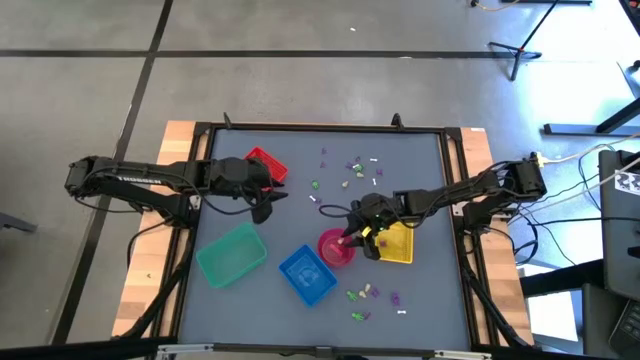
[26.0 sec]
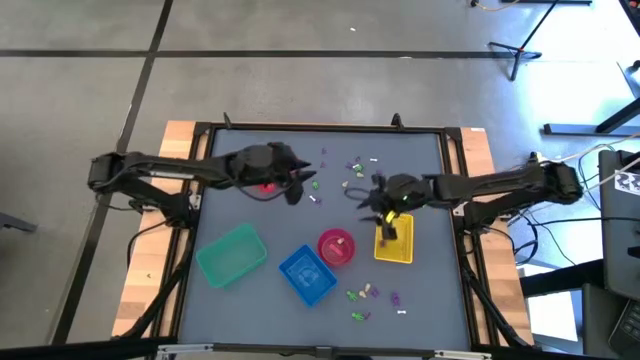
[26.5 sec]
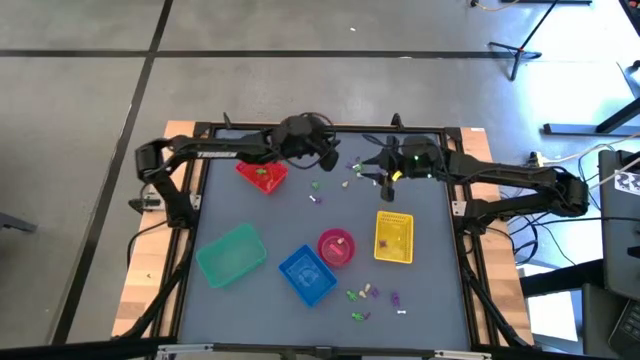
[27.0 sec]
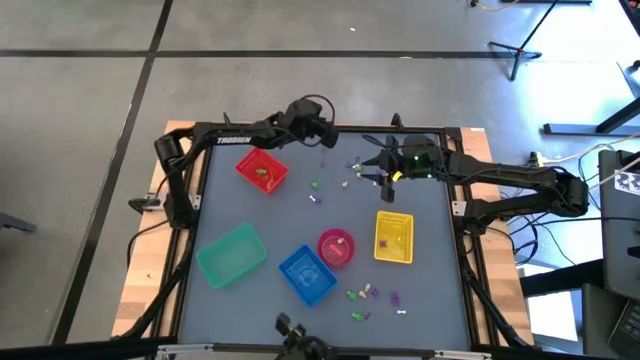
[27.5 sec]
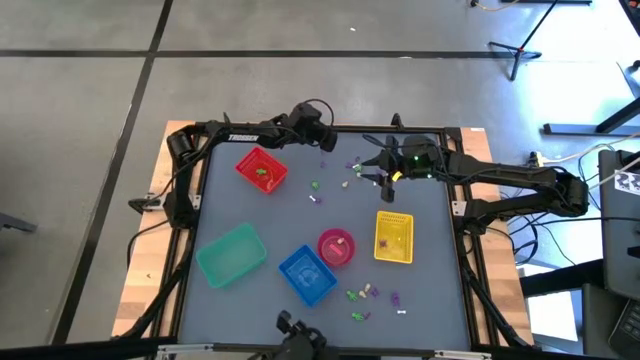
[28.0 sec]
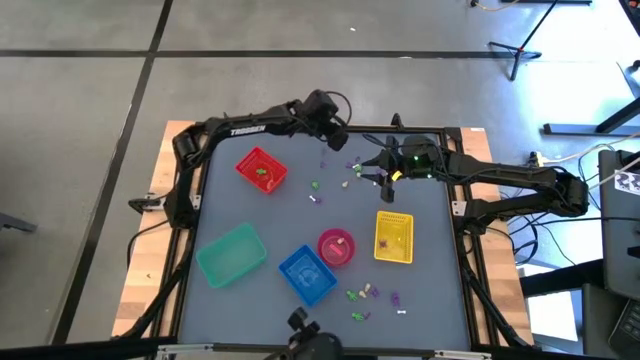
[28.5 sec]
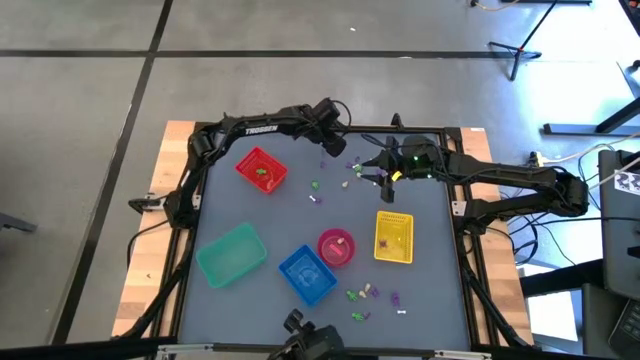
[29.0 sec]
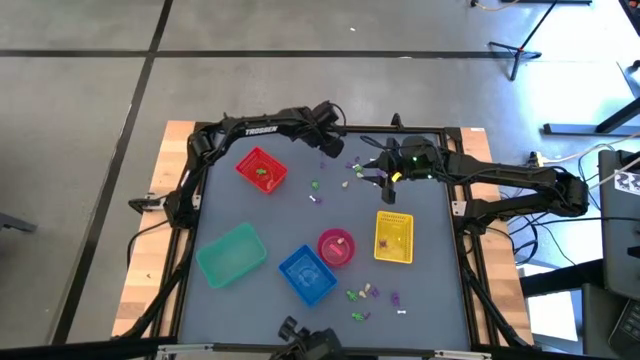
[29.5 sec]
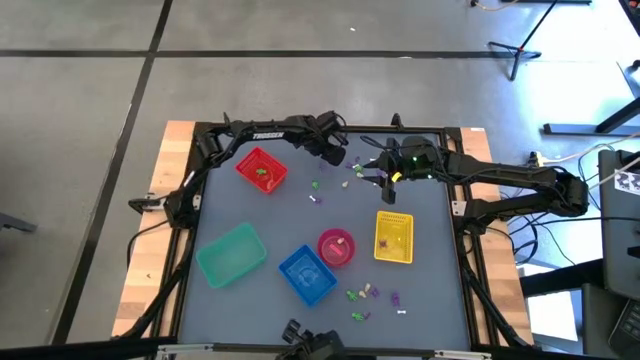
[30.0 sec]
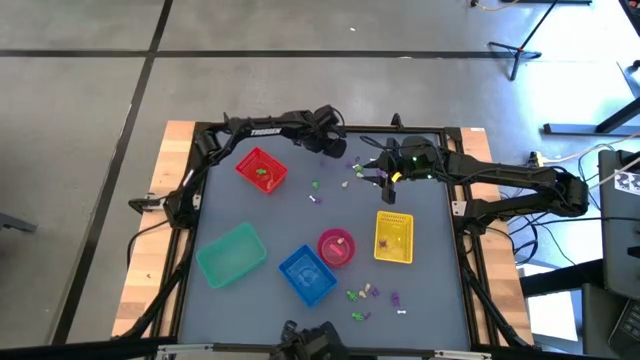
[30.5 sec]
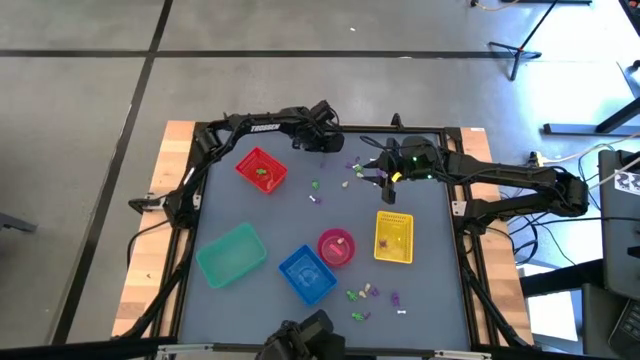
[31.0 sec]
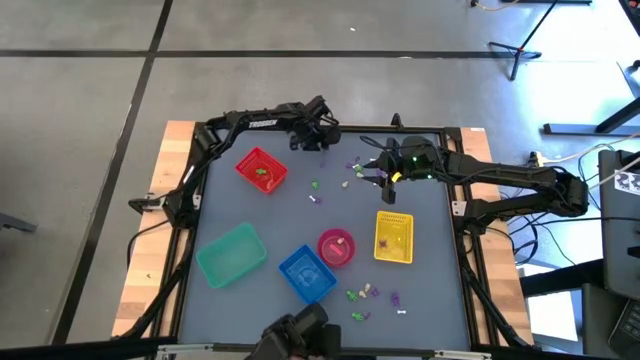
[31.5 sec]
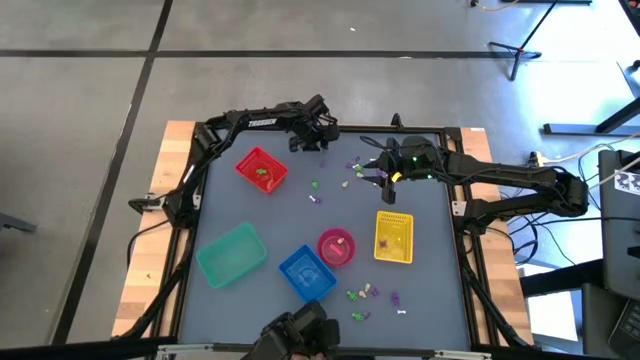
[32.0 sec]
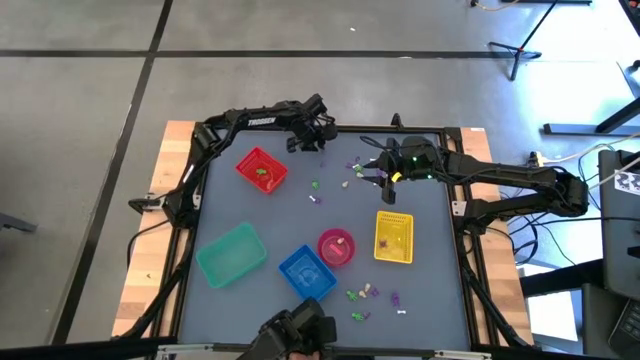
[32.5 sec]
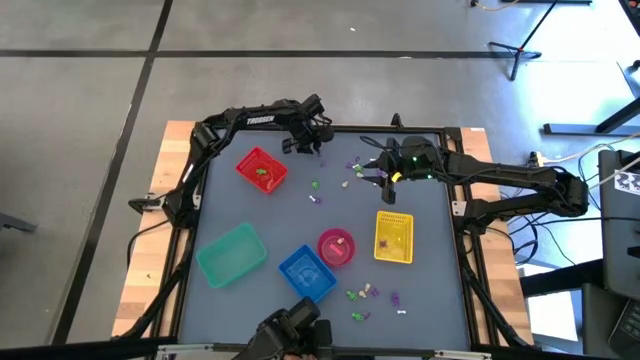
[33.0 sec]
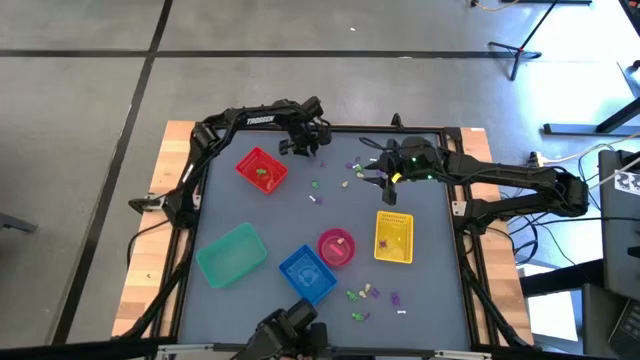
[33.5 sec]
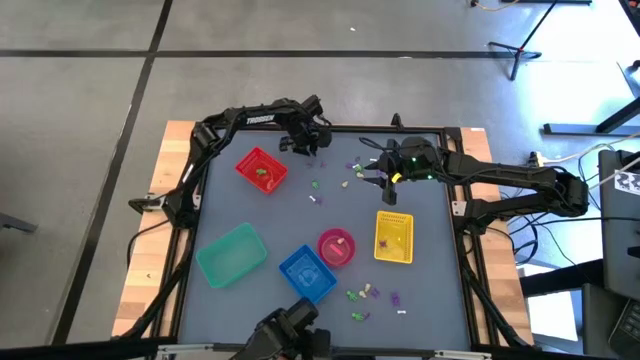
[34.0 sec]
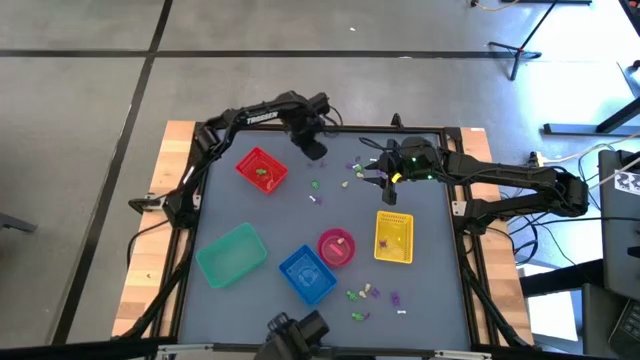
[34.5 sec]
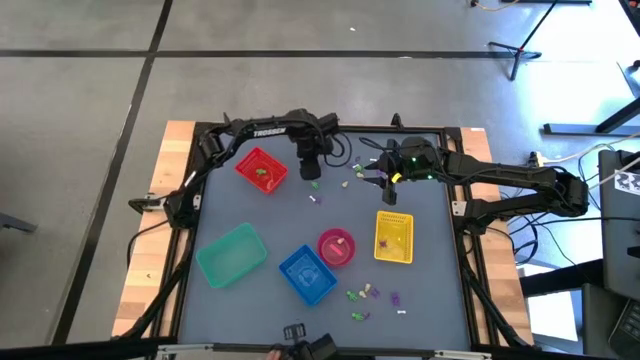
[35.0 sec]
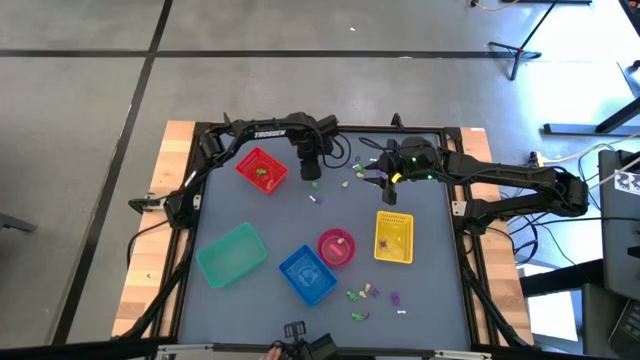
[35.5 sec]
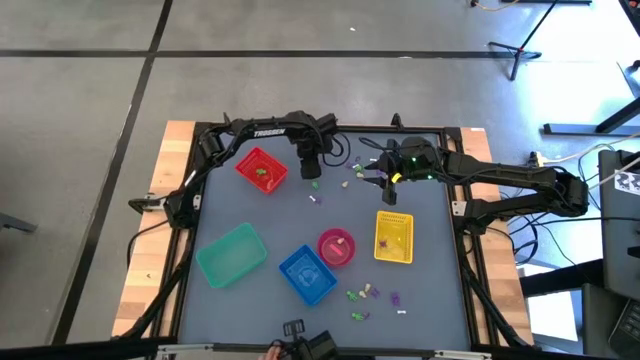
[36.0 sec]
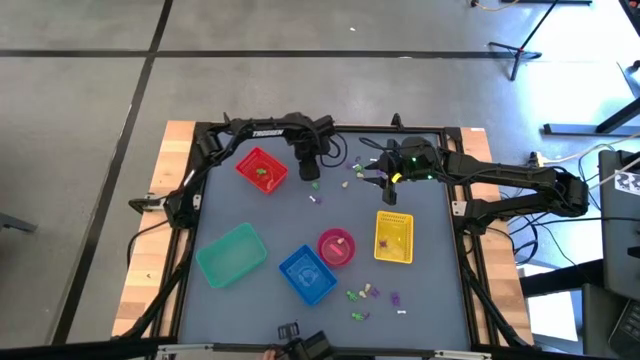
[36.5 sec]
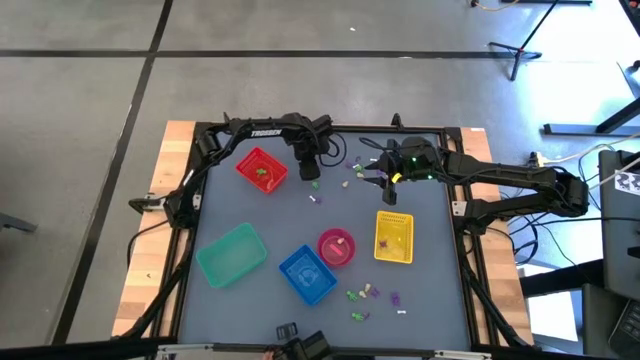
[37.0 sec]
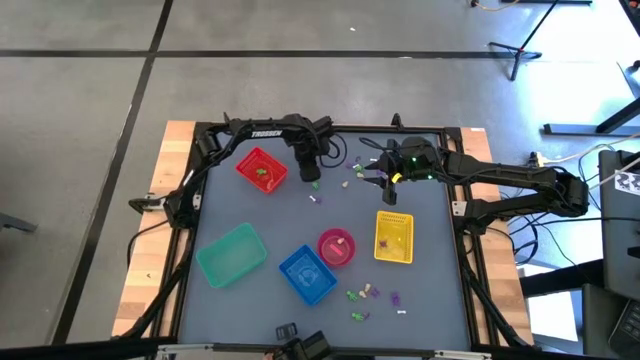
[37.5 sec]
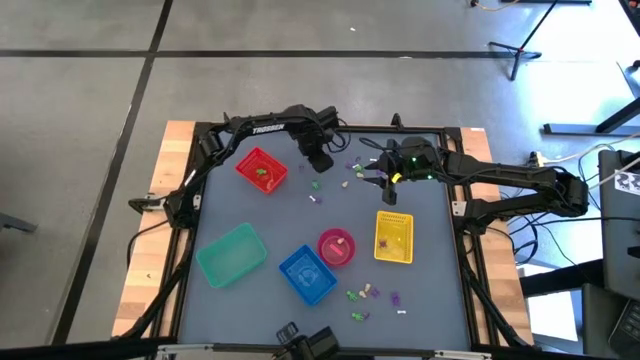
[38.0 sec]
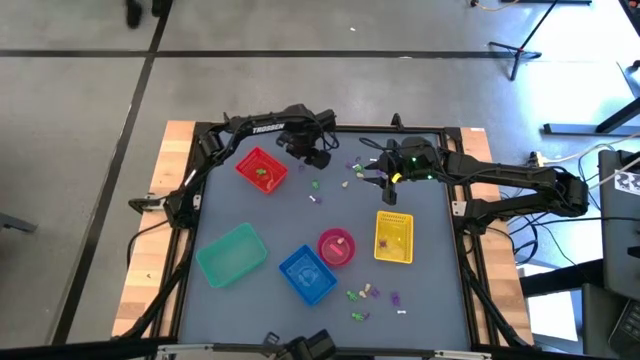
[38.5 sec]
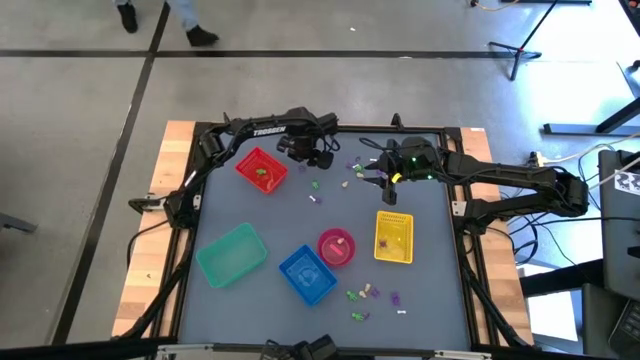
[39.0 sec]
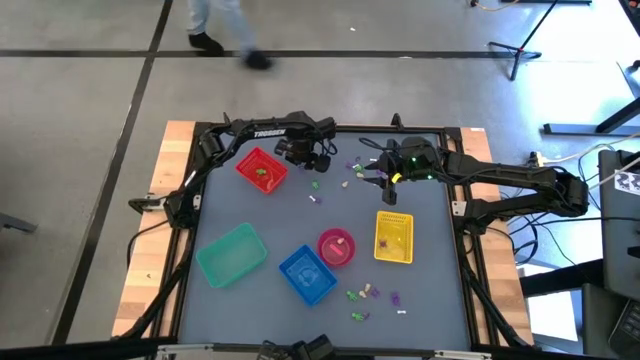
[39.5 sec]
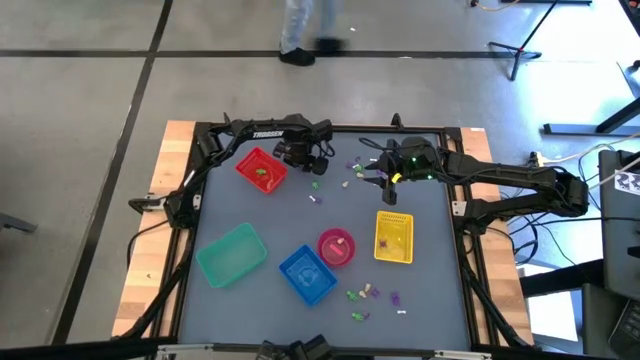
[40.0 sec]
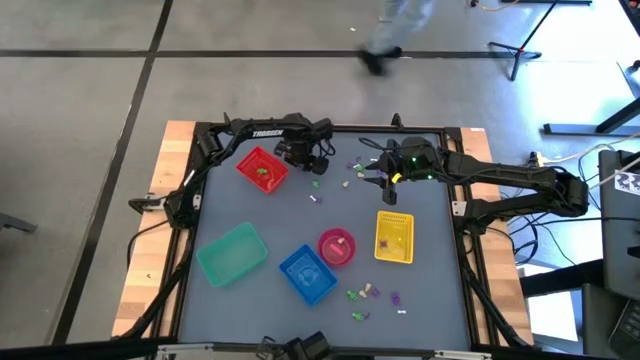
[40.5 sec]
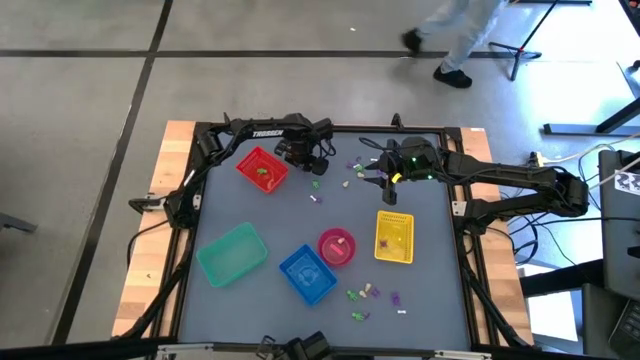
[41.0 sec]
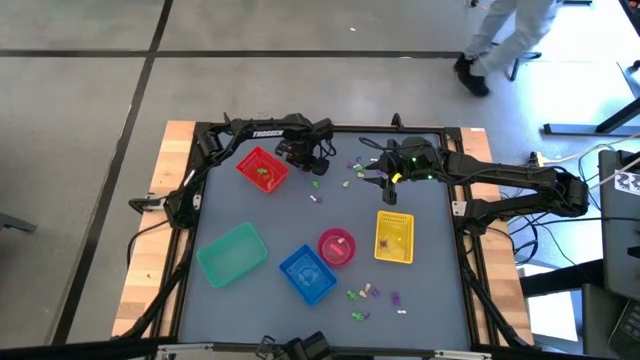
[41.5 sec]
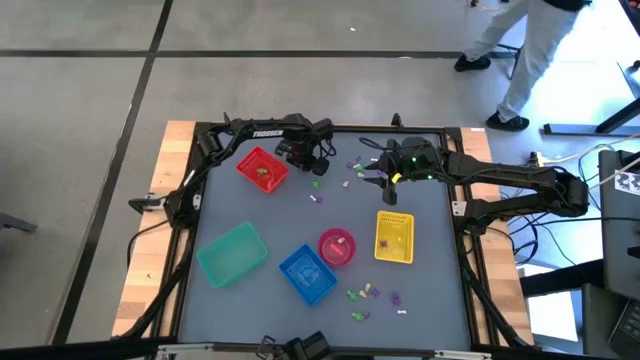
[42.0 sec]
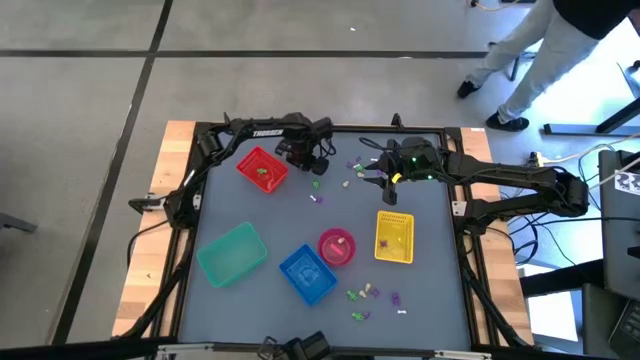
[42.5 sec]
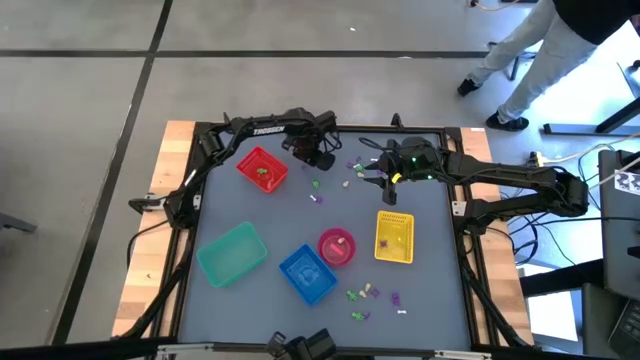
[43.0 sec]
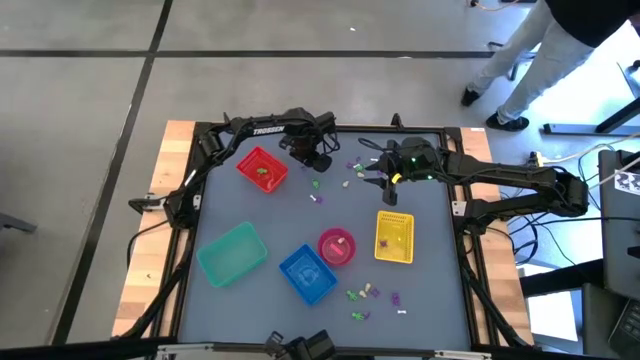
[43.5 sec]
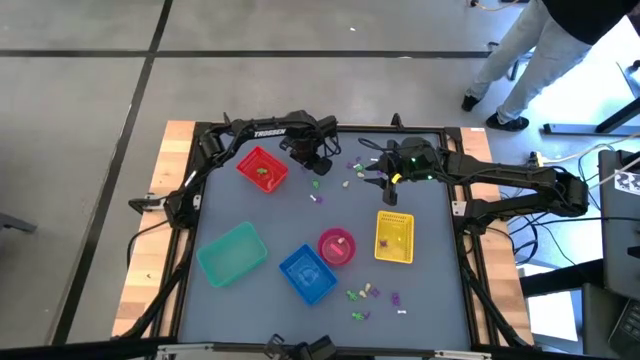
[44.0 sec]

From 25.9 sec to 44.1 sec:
Task: Sort Halloween decoration
Put the violet witch hat toy into the blue bin

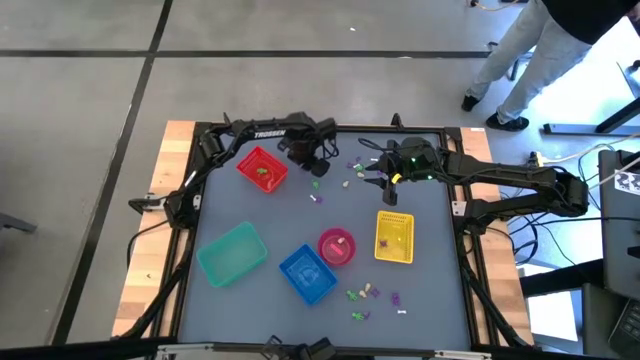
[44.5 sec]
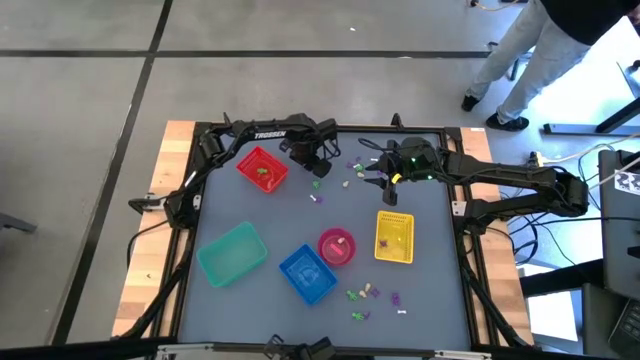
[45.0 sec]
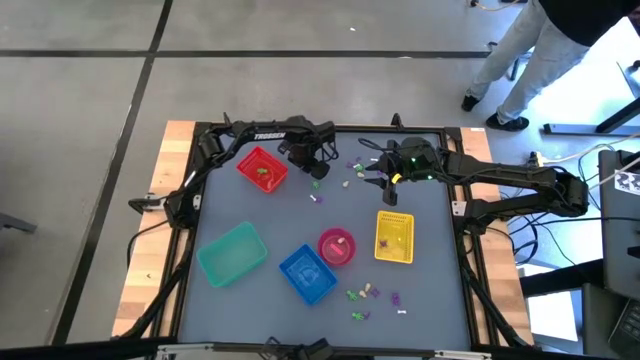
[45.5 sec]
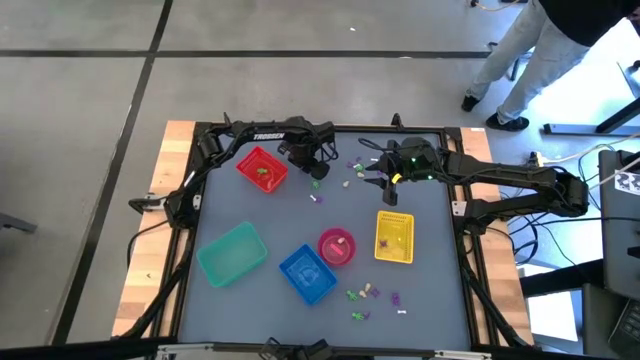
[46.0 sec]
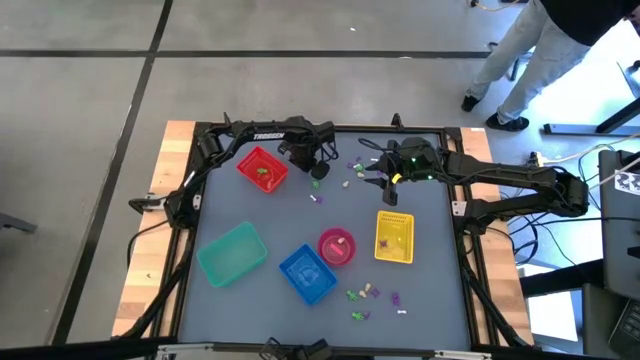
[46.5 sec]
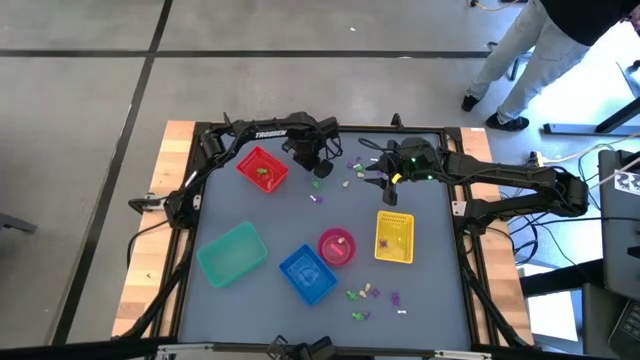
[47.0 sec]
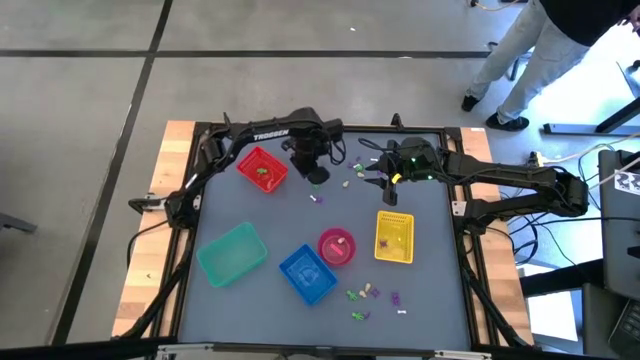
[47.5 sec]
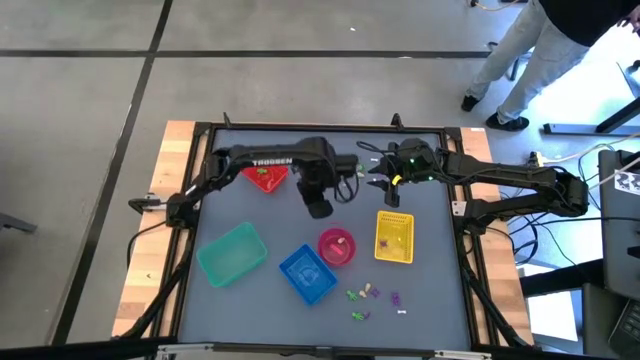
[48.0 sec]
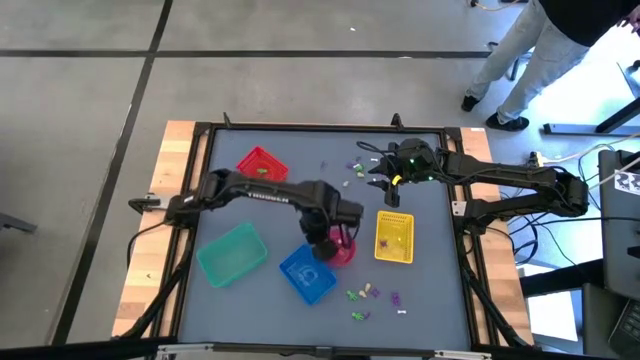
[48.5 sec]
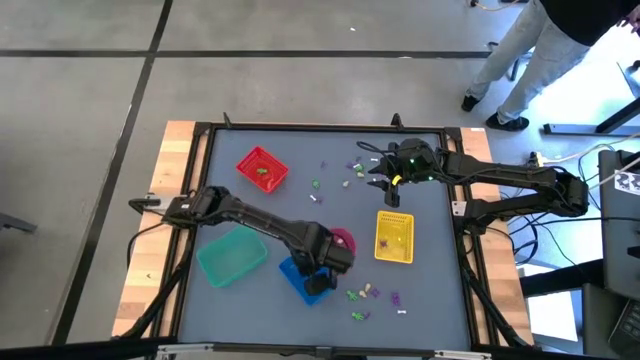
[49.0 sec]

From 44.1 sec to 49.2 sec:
Put the violet witch hat toy into the blue bin
